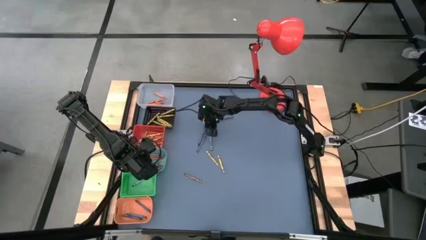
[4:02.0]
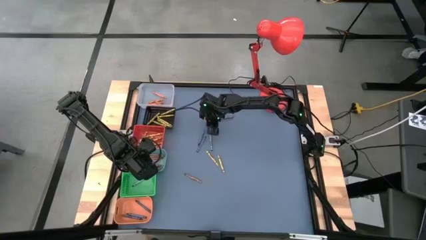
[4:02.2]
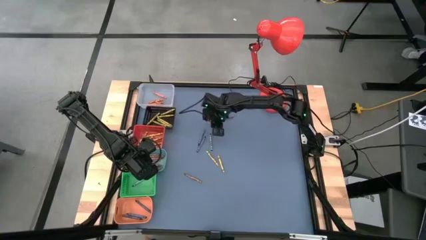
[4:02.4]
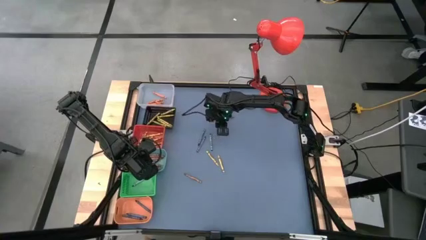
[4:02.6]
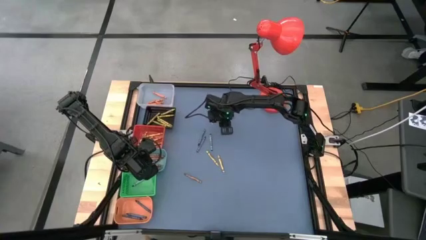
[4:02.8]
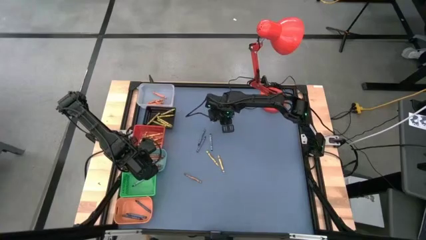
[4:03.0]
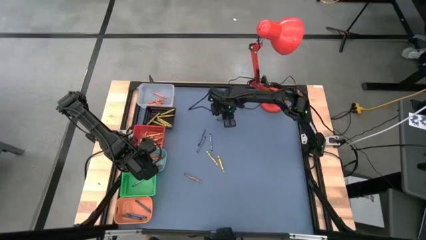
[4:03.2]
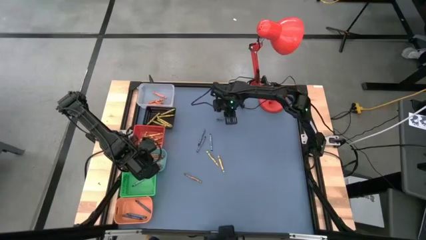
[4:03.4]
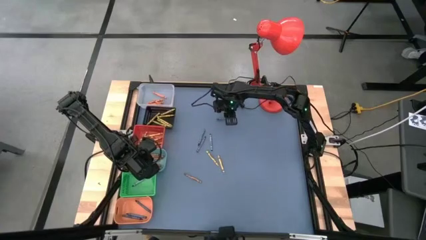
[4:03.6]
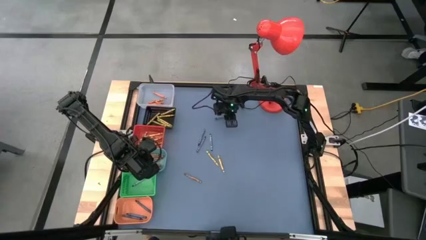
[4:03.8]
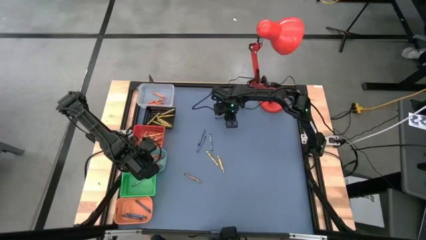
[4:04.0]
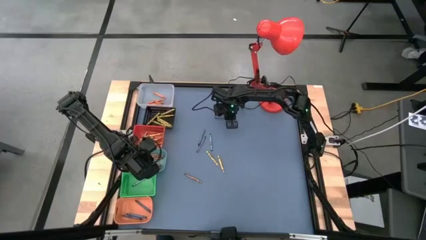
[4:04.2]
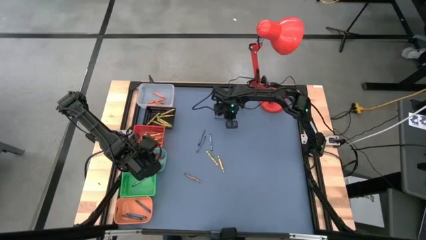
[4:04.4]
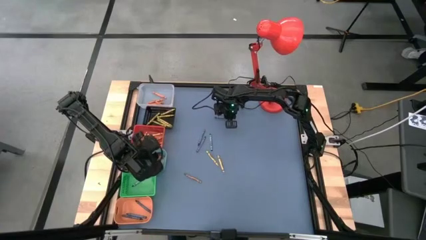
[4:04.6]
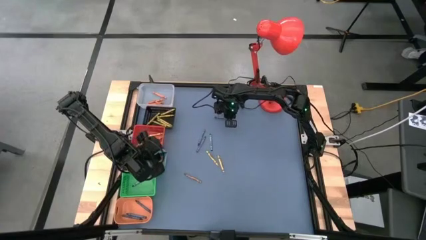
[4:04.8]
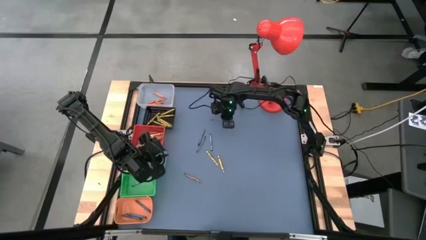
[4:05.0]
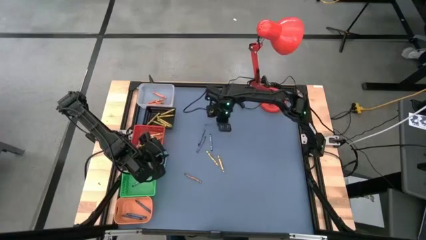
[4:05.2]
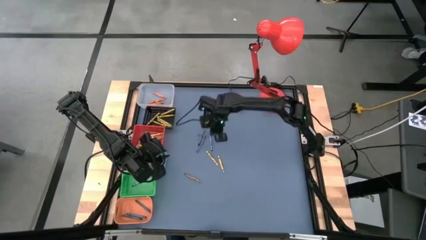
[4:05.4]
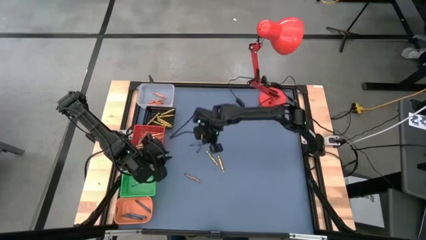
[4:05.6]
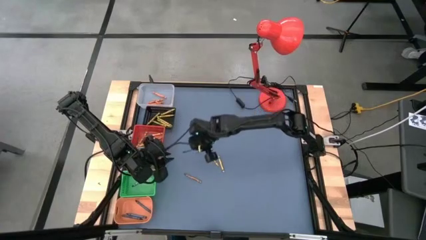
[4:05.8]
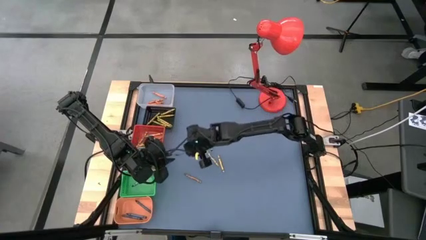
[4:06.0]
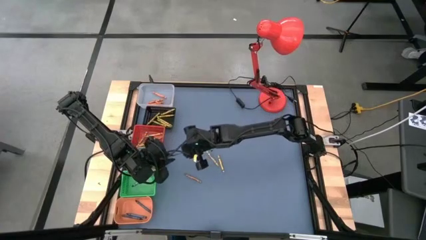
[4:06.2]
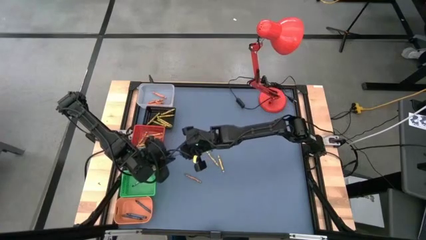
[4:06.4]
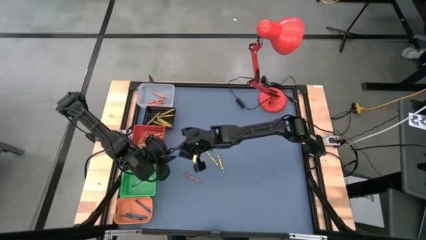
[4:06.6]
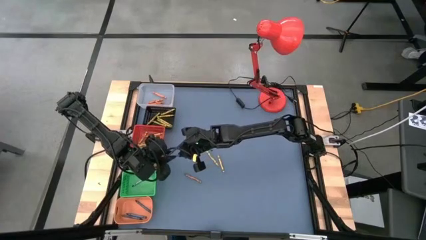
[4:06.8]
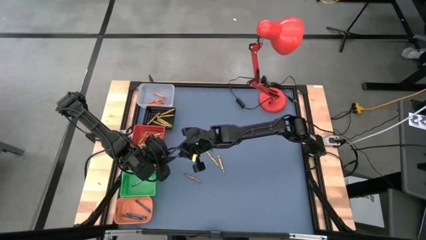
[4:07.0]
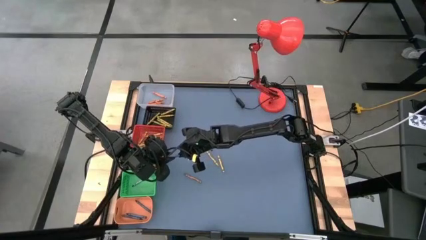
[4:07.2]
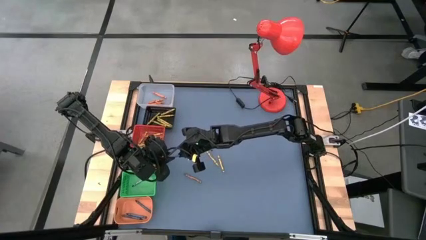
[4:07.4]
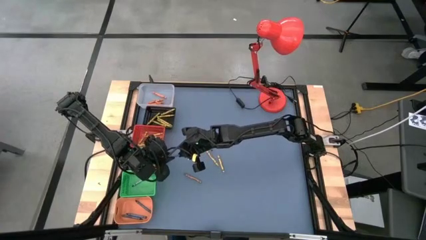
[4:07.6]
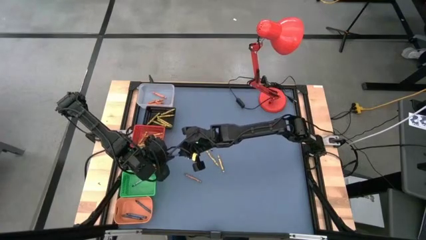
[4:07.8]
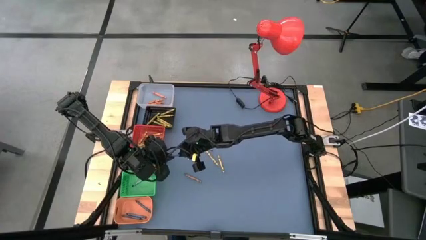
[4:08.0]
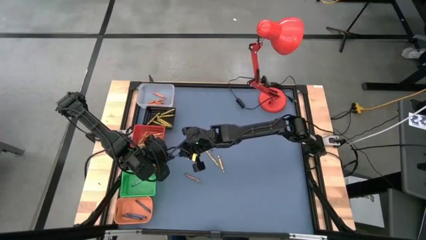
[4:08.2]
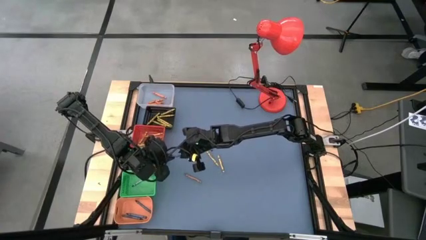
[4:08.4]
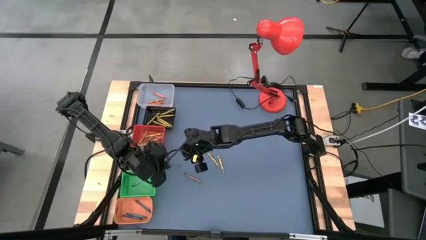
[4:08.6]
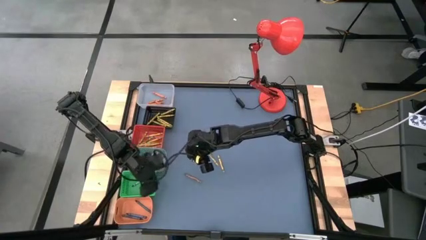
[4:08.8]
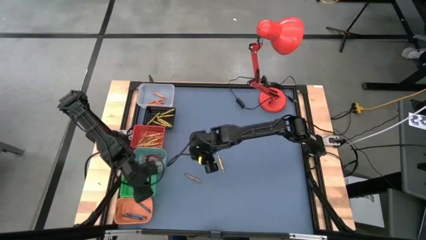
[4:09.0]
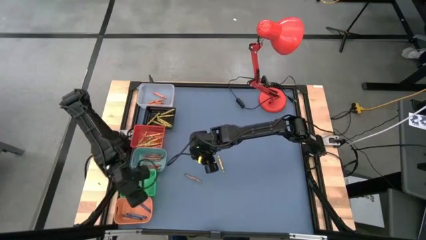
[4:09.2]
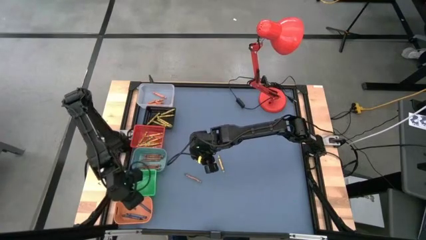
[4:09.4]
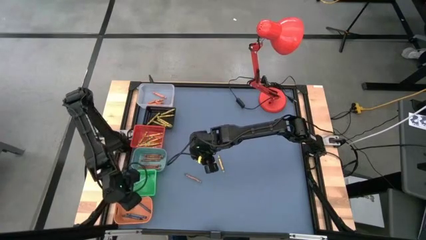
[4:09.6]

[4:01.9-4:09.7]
Task: Sort crayons
Put the violet crayon into the light orange bin

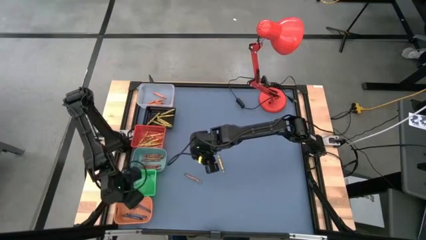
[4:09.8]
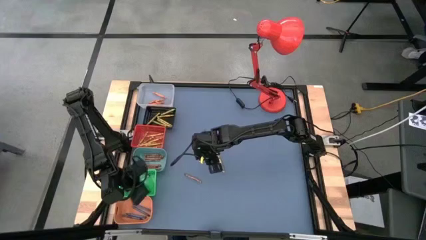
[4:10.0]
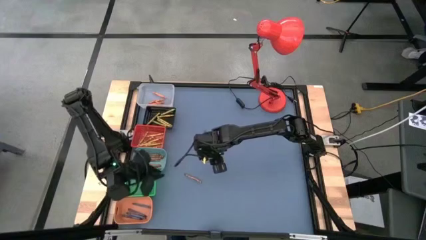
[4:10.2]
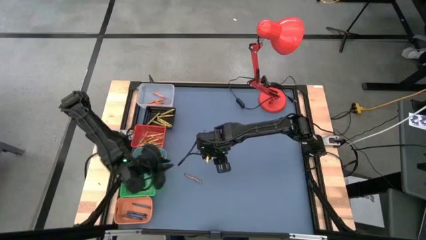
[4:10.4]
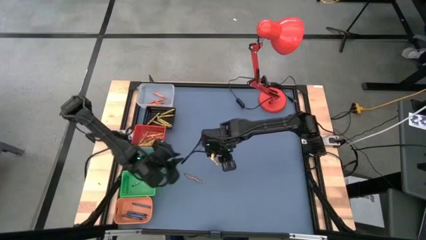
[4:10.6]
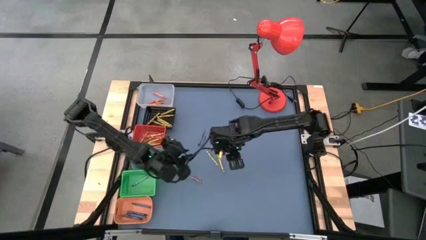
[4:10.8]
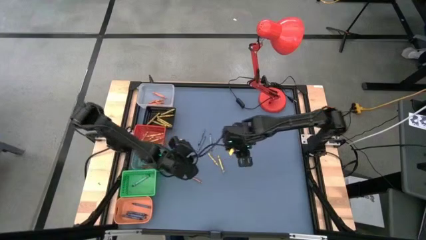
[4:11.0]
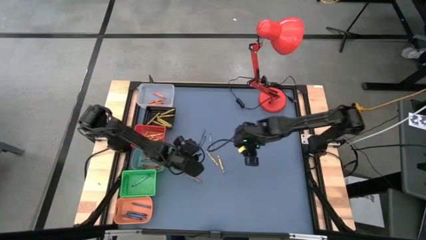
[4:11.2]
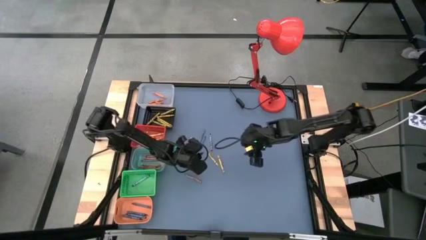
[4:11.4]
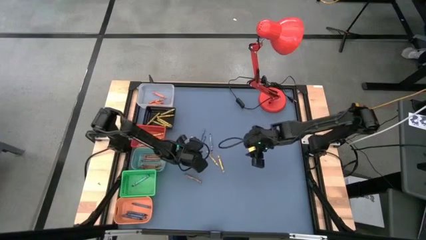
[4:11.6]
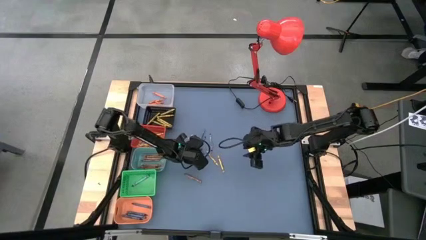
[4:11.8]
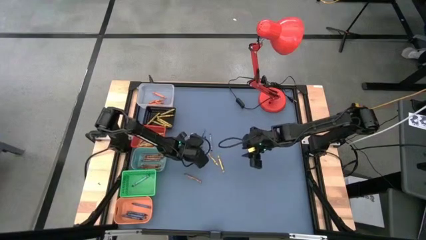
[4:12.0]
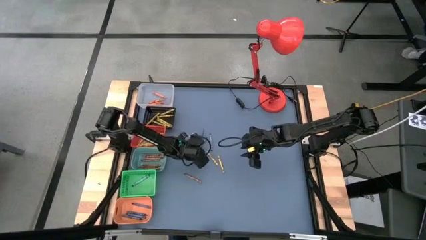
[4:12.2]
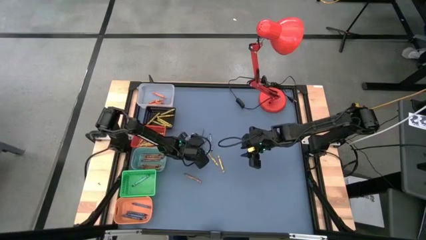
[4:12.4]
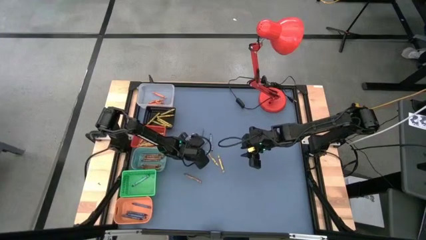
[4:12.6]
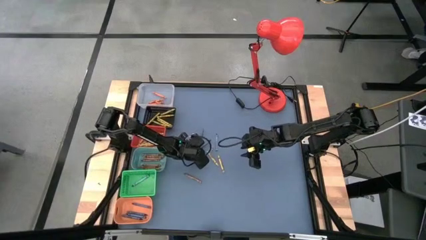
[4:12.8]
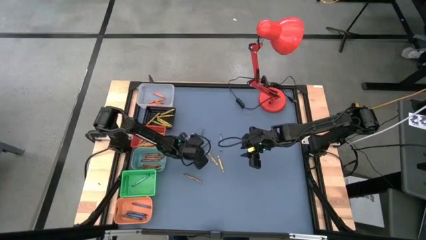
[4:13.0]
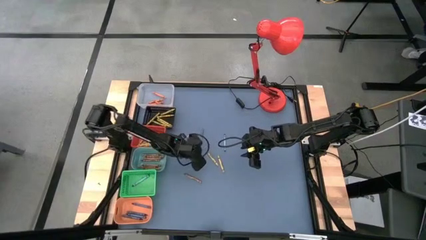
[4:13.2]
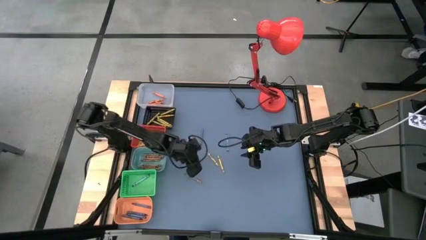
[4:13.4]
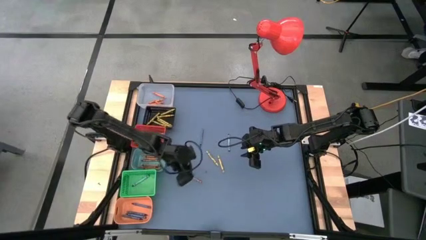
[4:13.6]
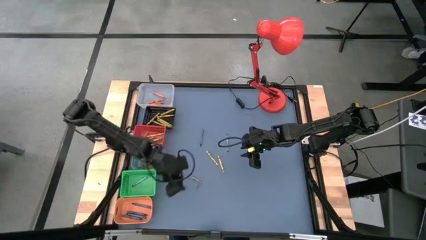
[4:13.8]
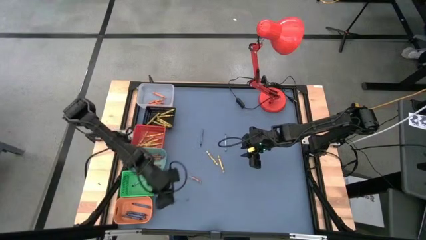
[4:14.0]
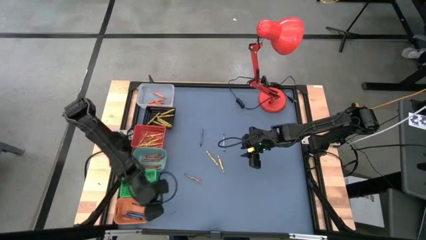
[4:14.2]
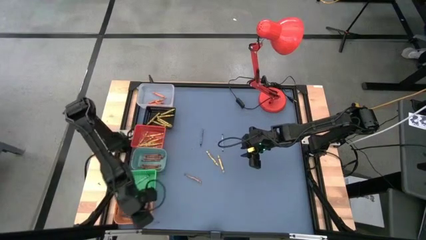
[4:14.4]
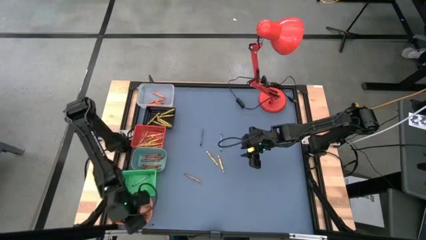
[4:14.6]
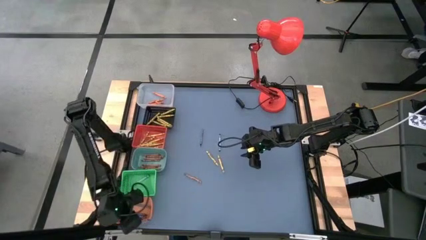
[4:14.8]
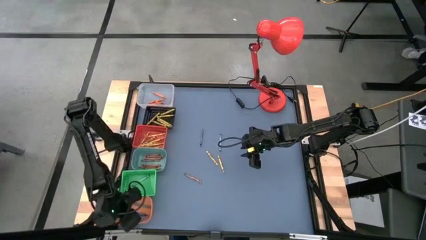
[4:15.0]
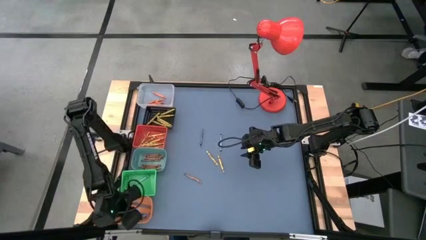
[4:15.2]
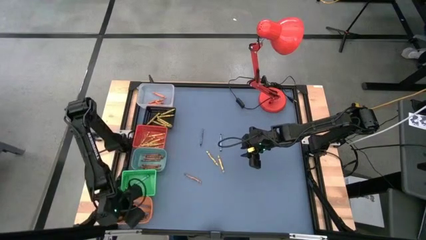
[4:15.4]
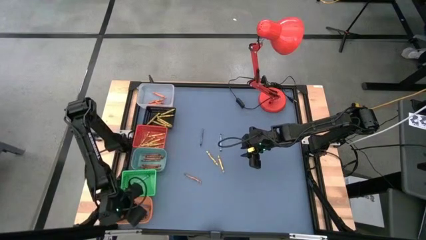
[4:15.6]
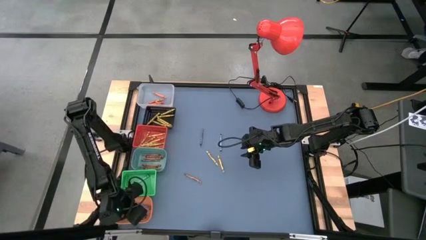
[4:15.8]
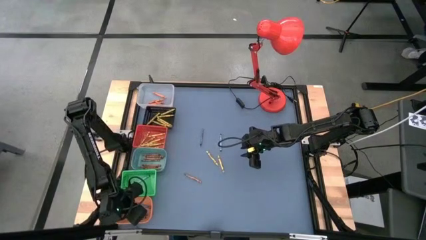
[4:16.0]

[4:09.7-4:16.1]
Put the violet crayon into the light orange bin

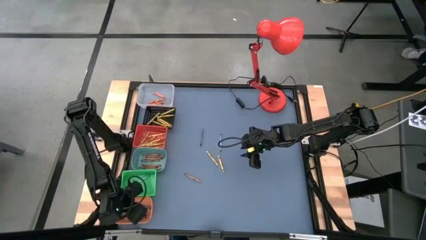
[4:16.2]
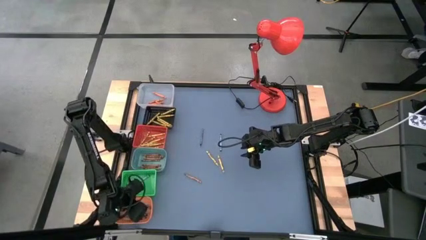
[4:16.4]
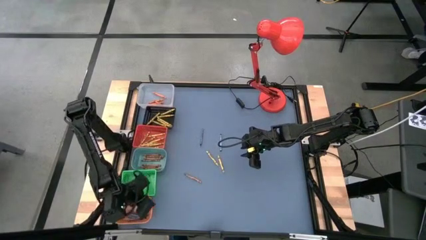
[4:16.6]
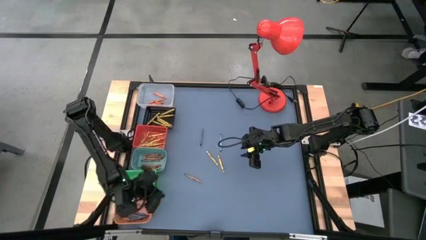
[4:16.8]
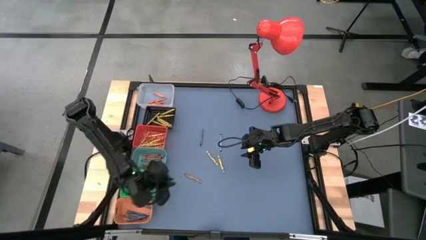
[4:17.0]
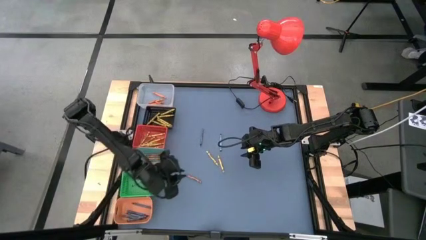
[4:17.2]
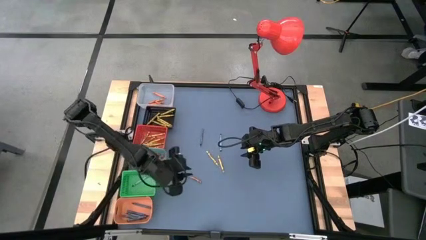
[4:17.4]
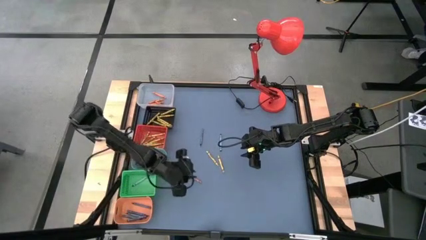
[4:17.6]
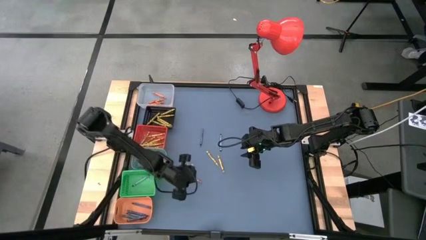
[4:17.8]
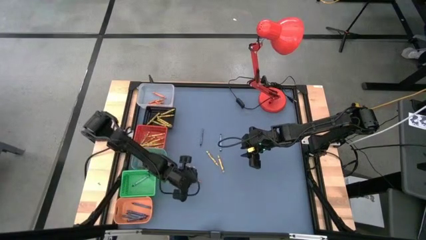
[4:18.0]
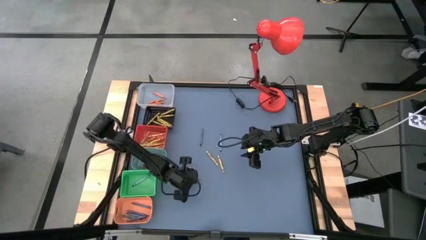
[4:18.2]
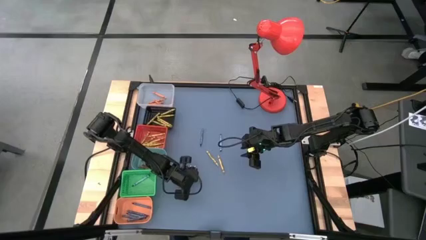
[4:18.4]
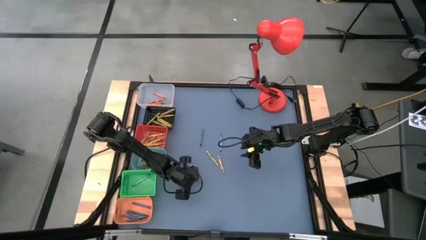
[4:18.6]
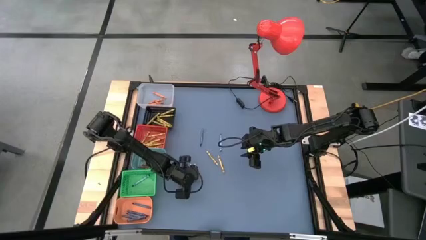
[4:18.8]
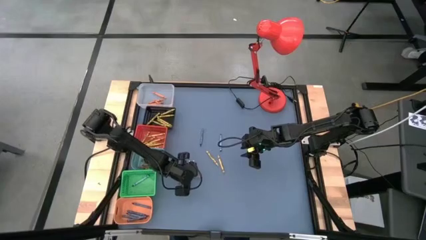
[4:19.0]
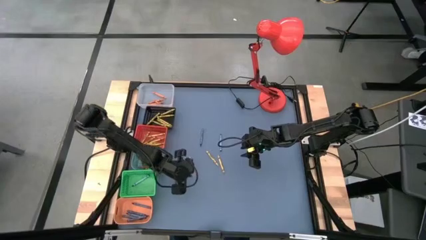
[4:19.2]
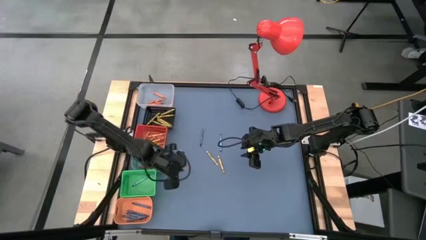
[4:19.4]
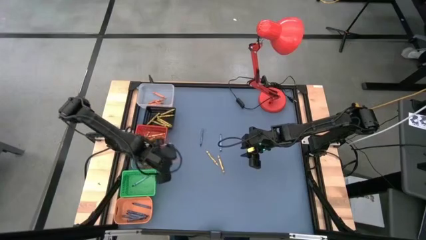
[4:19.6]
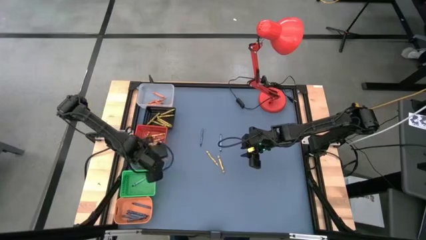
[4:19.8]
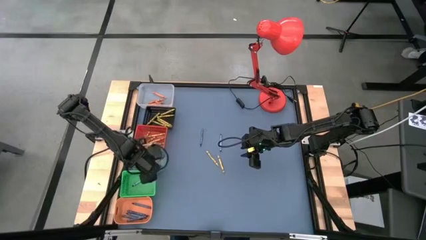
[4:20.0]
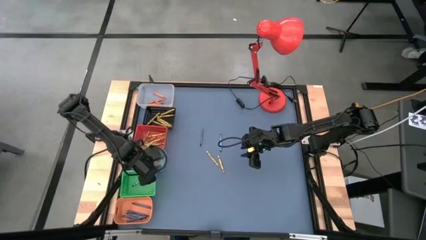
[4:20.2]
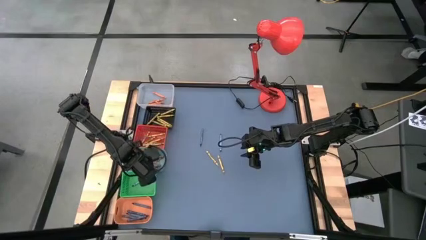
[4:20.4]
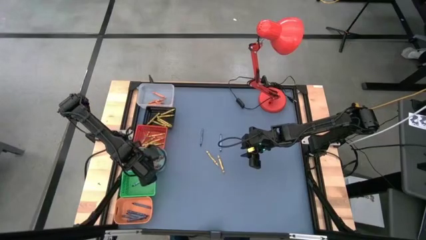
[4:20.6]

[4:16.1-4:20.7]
Put the brown crayon into the blue bin
